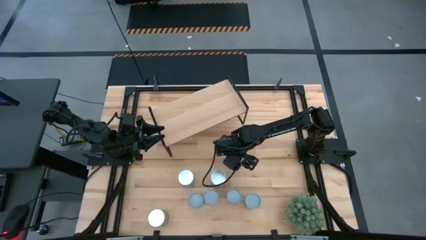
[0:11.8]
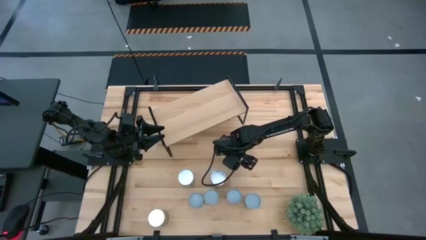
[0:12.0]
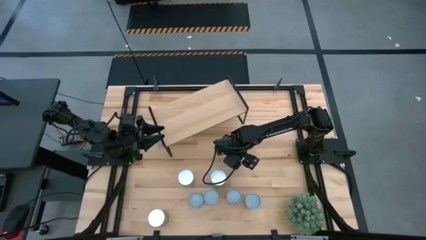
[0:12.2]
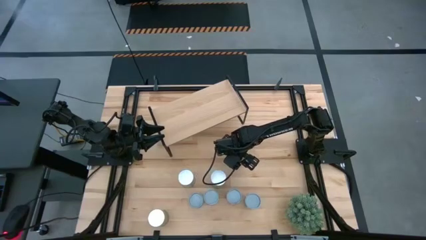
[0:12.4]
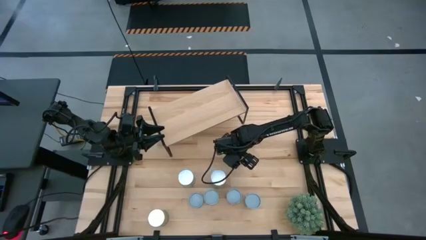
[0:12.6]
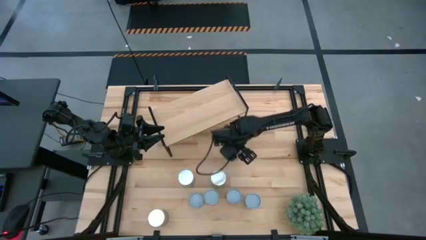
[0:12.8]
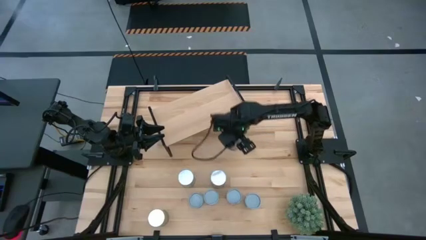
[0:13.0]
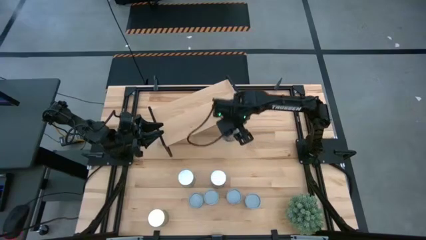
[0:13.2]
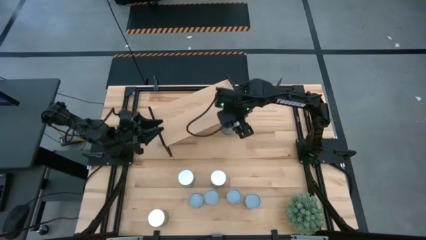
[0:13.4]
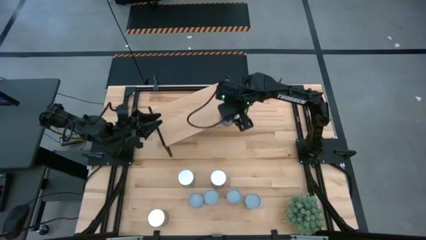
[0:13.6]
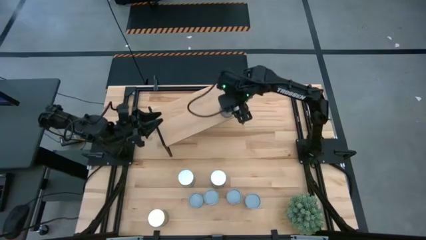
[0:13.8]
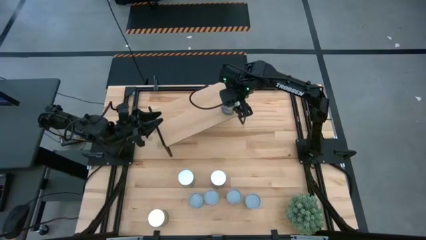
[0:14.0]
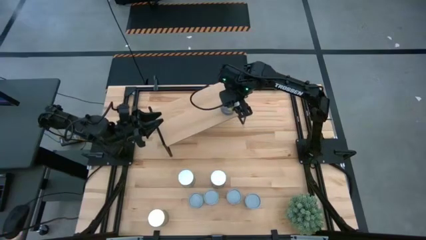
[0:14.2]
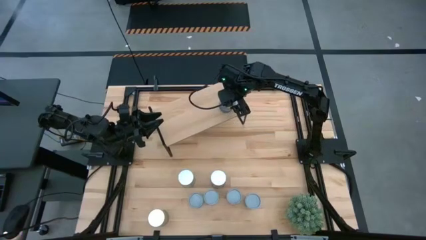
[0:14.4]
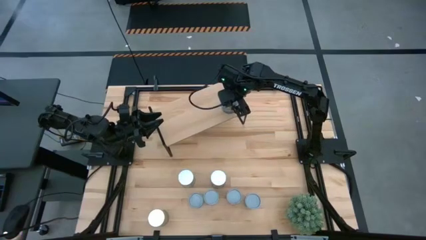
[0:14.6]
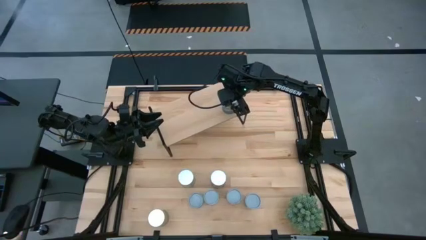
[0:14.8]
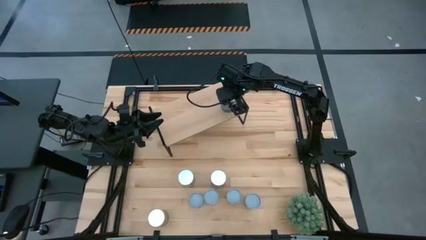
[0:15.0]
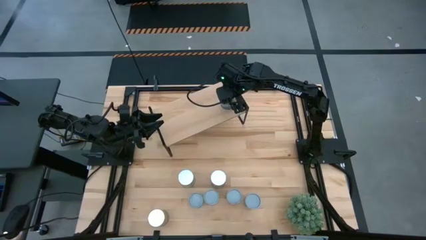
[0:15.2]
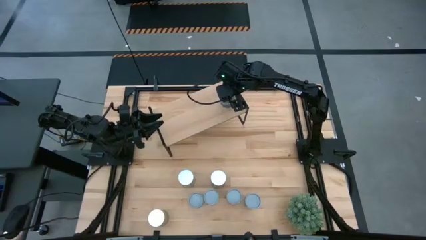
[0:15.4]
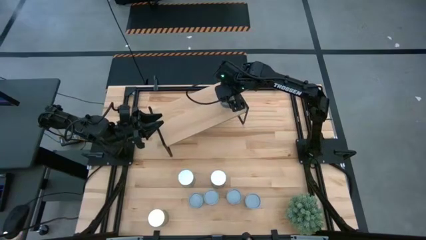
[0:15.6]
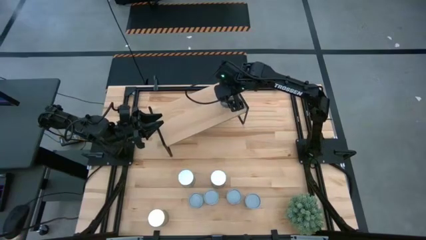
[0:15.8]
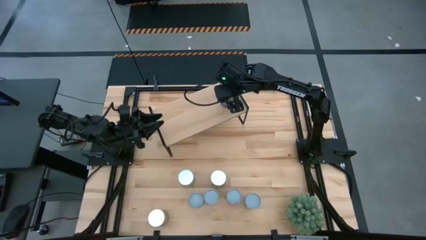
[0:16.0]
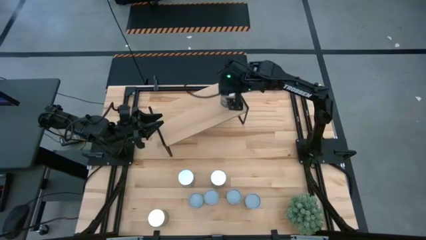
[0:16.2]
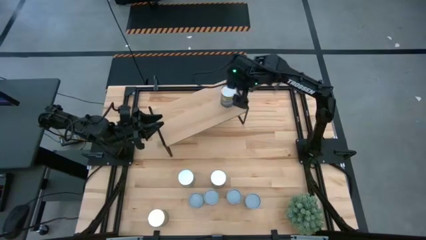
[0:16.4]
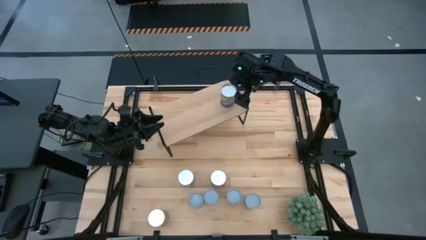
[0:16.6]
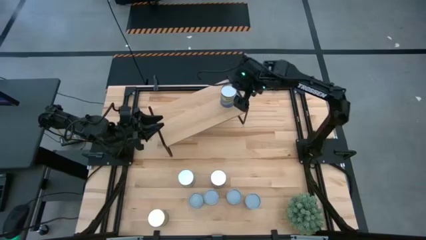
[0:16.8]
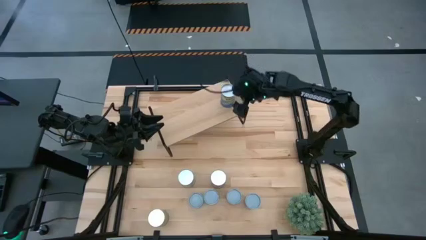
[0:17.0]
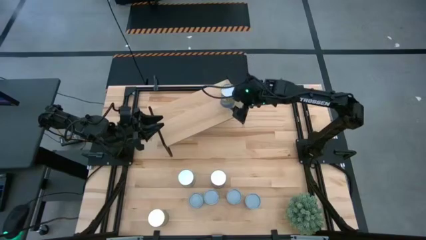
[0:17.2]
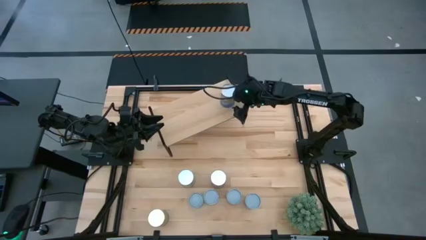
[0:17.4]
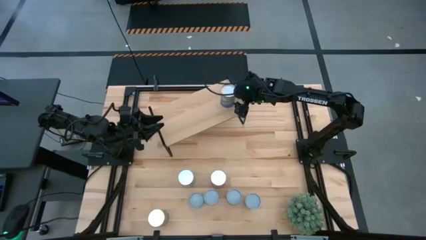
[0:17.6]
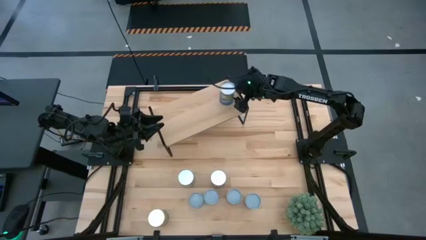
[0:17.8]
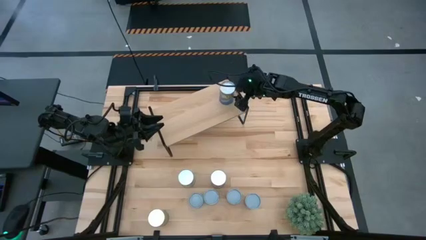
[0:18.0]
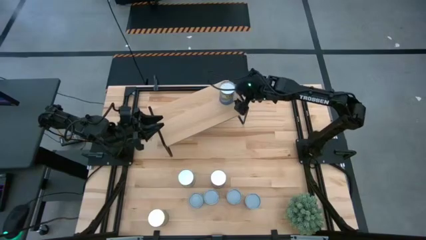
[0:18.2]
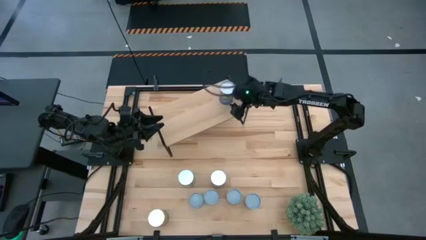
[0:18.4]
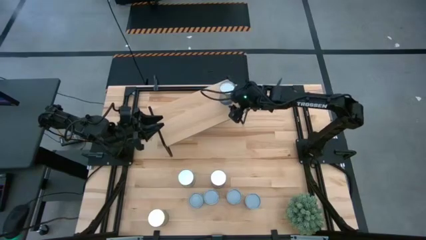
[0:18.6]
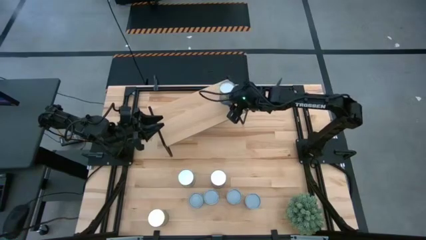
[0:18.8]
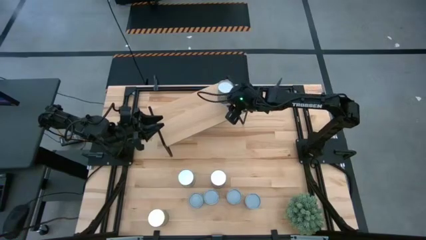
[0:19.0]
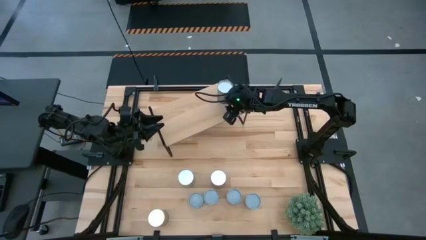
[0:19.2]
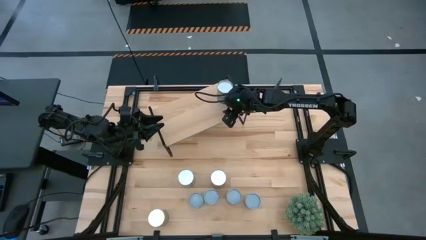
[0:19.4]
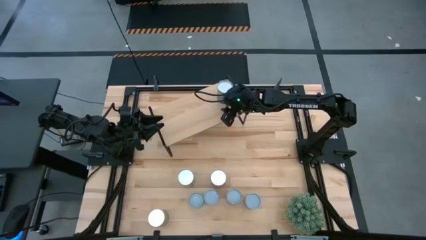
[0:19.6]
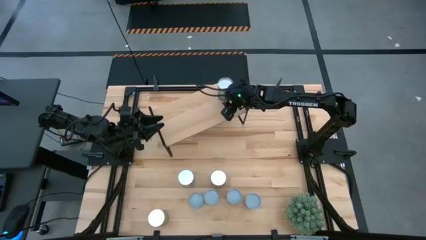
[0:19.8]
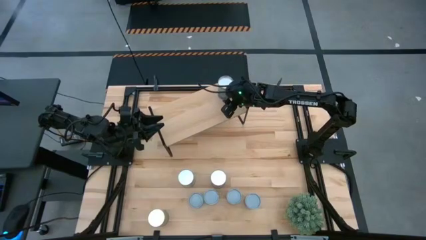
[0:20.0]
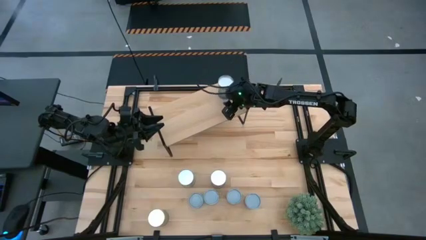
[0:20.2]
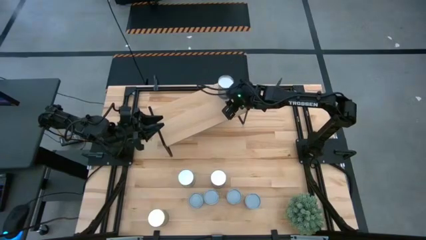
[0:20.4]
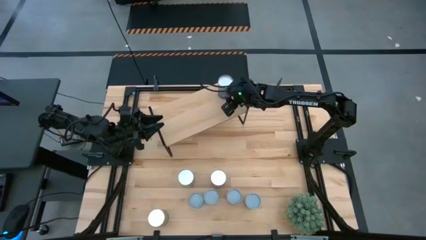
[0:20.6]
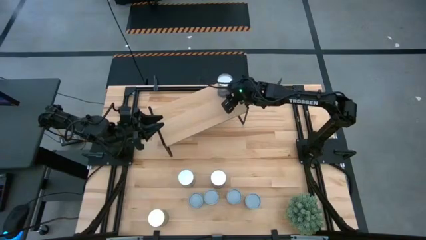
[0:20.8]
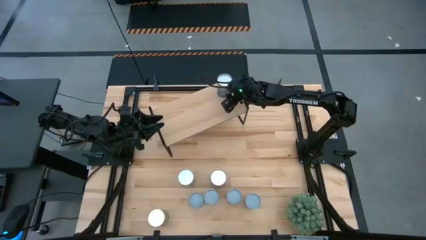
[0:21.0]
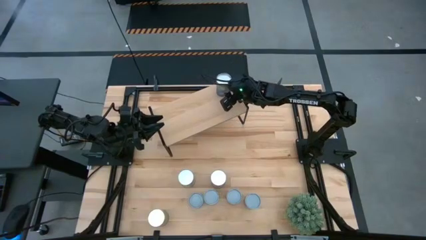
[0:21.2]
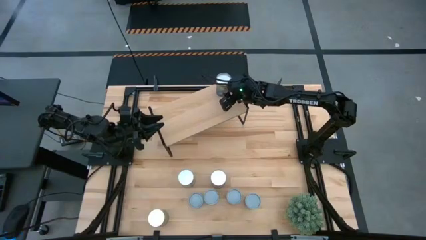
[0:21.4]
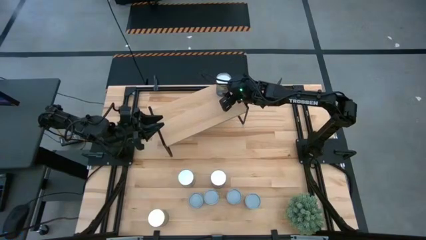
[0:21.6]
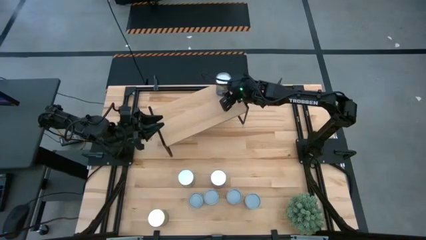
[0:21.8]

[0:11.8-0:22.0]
Task: Pick and place cans onto a shelf
Put the canned peas on the shelf

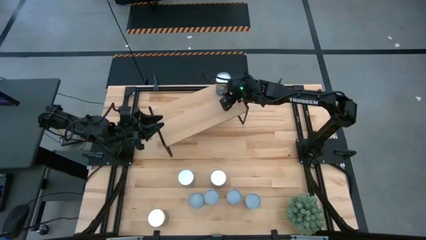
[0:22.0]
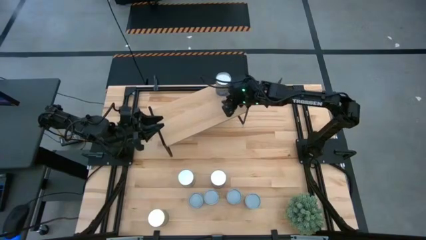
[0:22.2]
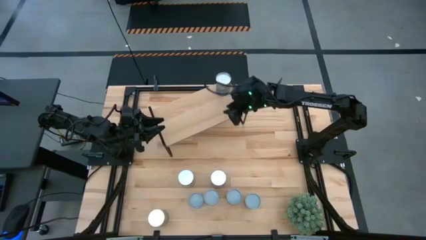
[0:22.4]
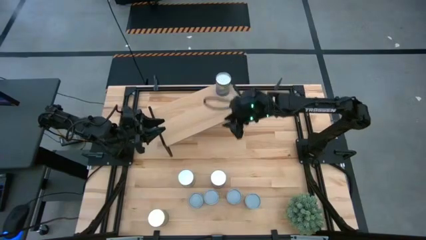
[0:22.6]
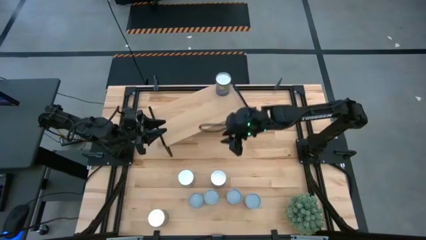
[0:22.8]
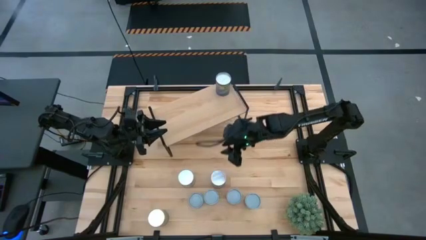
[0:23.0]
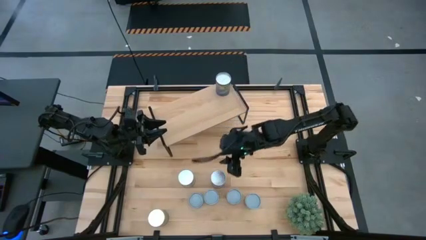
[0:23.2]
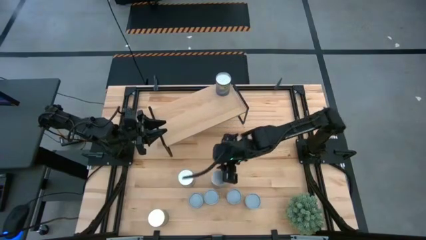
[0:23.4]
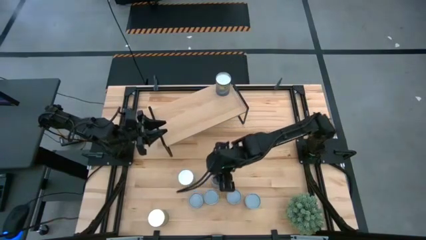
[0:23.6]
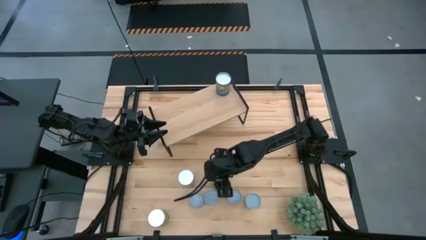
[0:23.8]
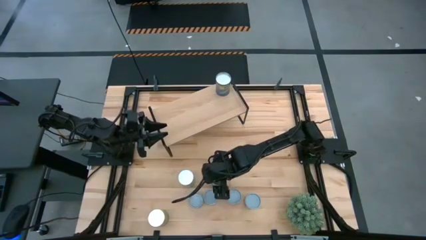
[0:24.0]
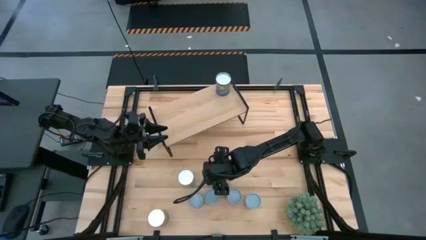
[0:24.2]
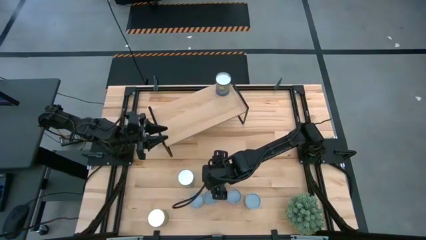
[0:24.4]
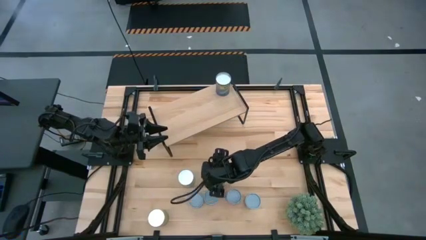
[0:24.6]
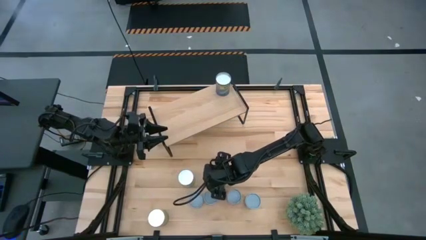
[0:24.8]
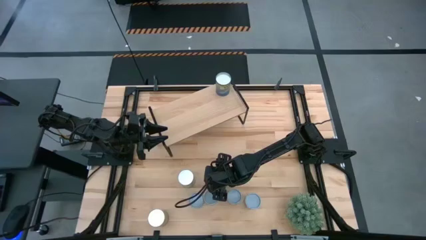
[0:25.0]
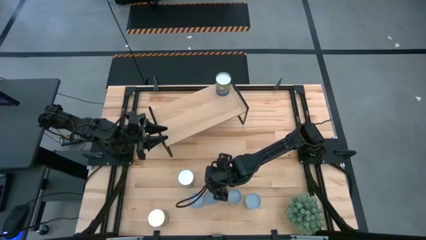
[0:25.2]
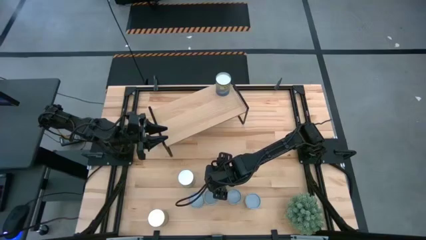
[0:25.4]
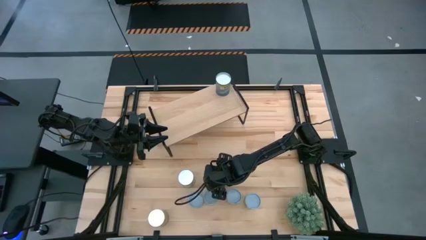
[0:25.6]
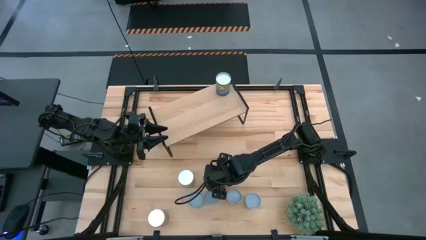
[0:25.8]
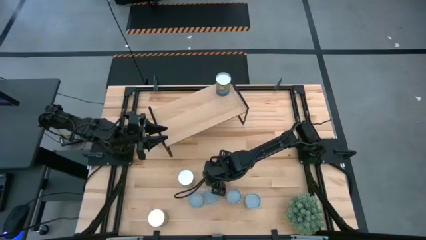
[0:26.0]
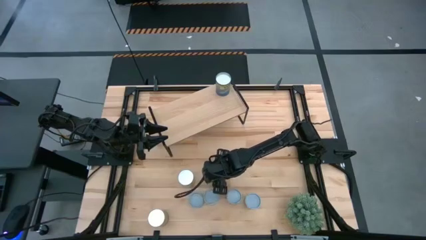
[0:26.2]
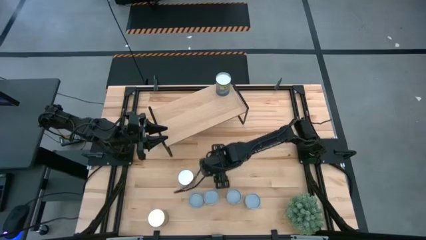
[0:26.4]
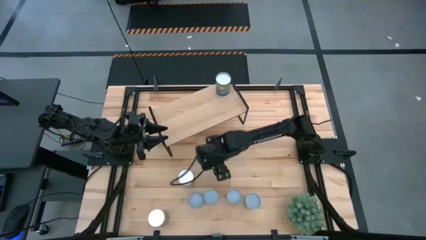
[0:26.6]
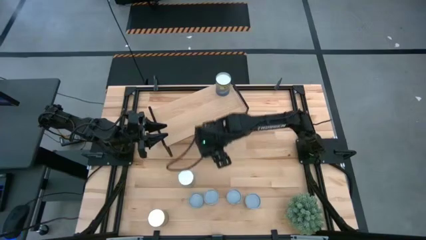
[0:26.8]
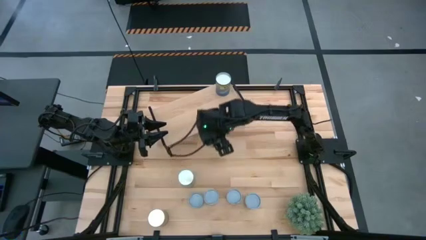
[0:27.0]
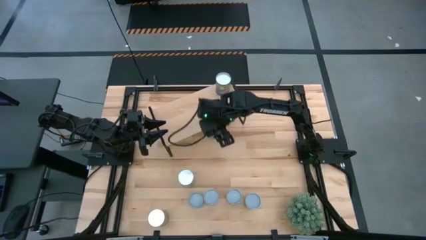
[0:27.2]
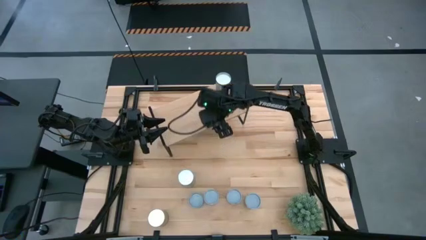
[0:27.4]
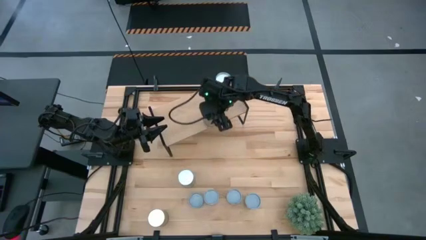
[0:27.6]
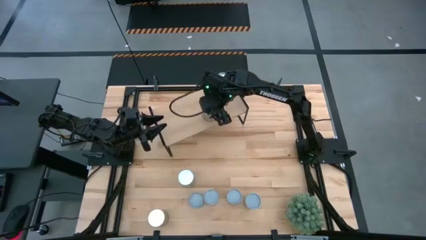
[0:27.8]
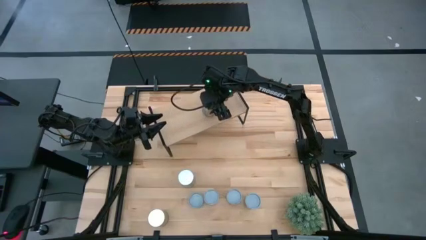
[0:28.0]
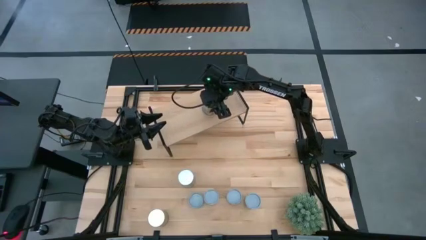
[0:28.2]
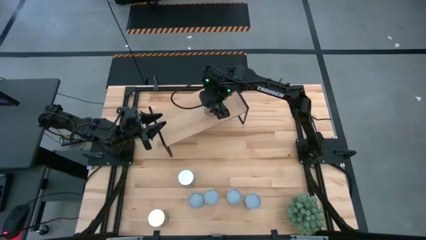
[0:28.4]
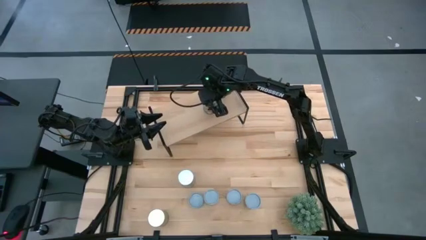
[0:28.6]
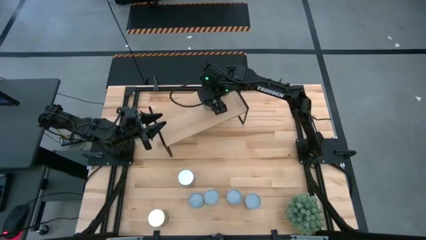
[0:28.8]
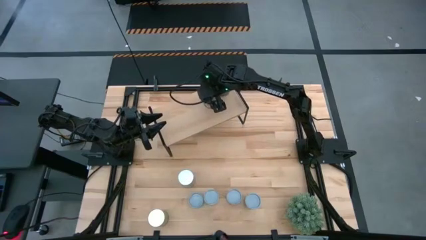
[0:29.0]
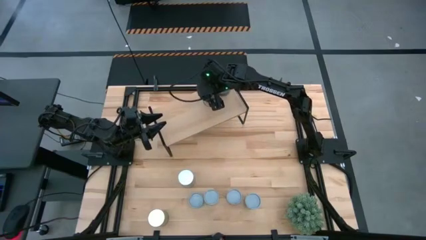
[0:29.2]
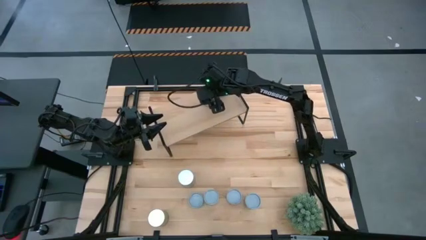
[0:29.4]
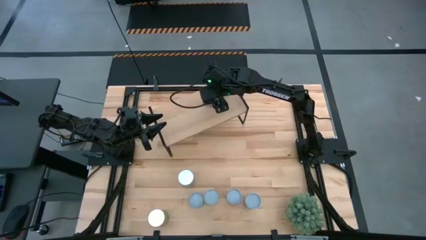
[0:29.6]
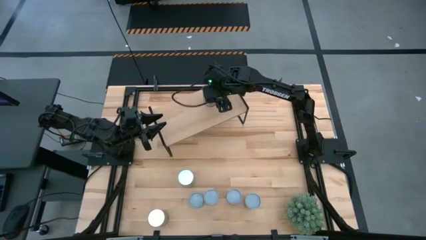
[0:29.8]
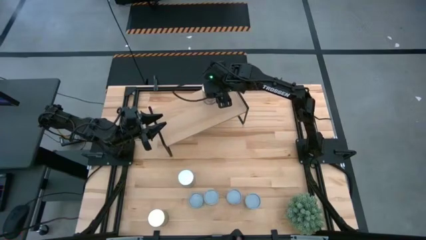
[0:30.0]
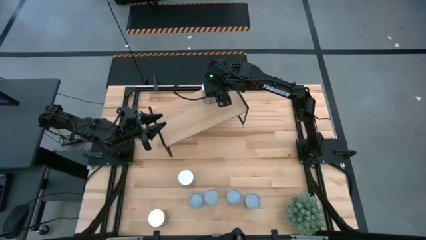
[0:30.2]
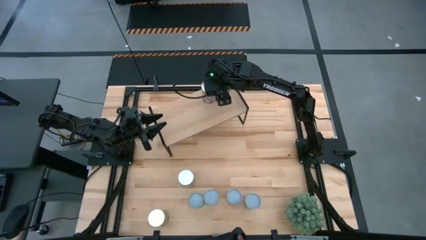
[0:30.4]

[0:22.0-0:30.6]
Put the canned peaches on the shelf
